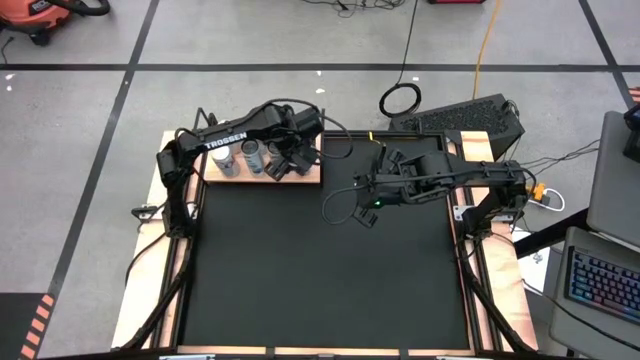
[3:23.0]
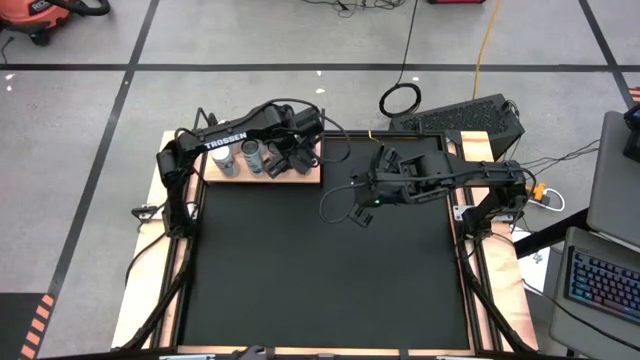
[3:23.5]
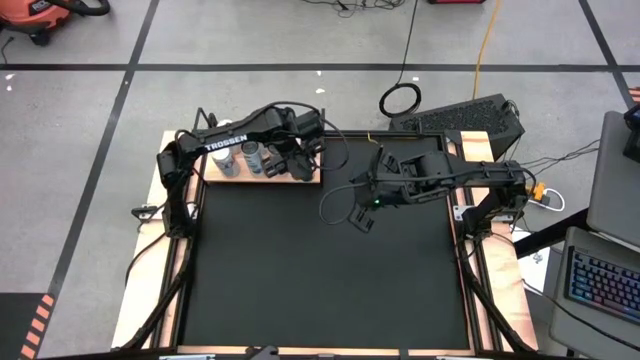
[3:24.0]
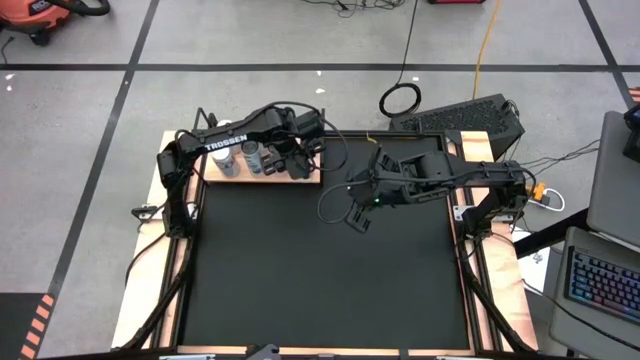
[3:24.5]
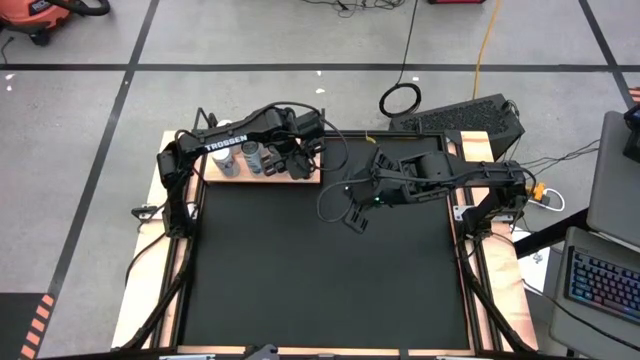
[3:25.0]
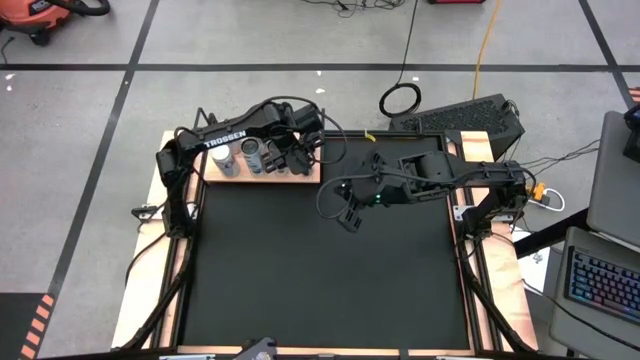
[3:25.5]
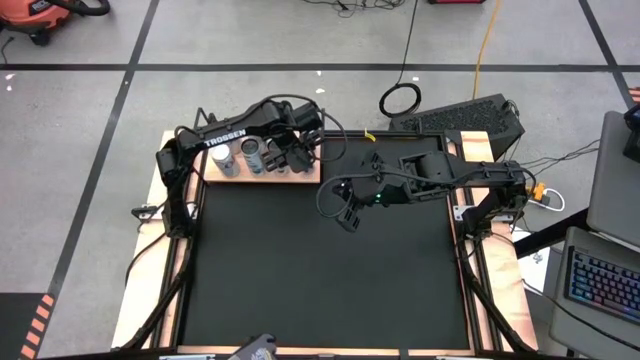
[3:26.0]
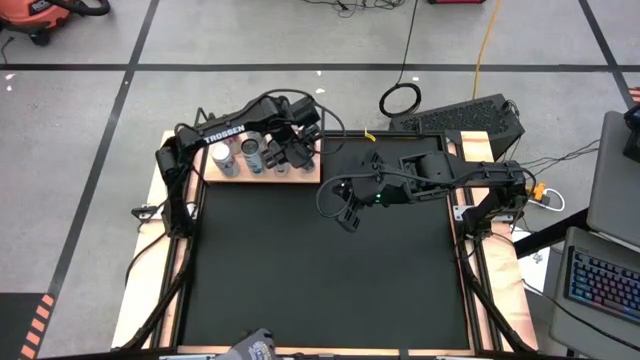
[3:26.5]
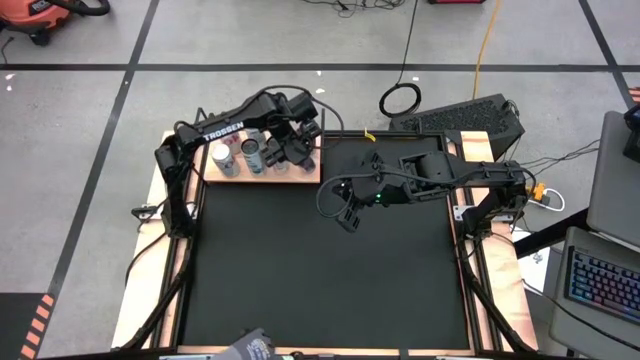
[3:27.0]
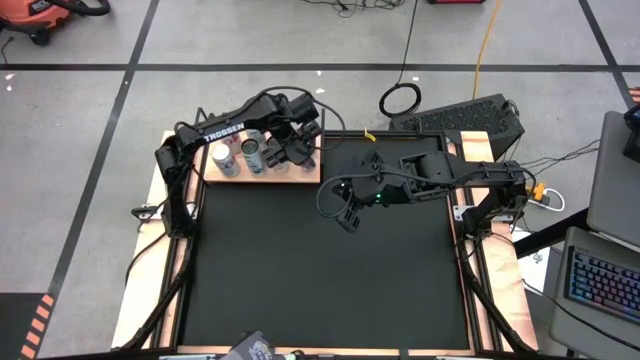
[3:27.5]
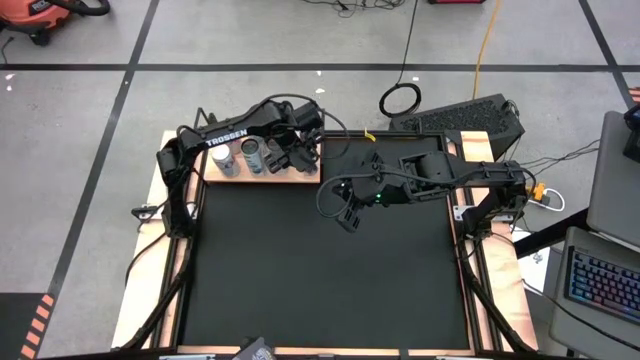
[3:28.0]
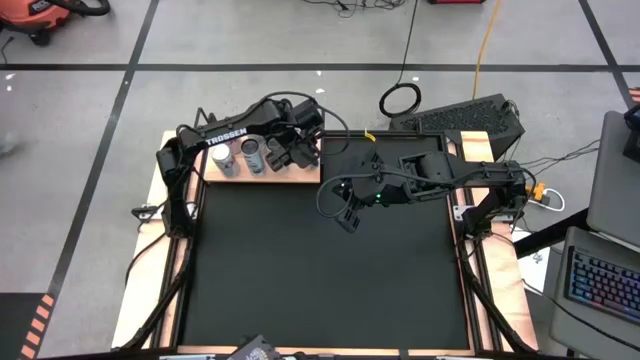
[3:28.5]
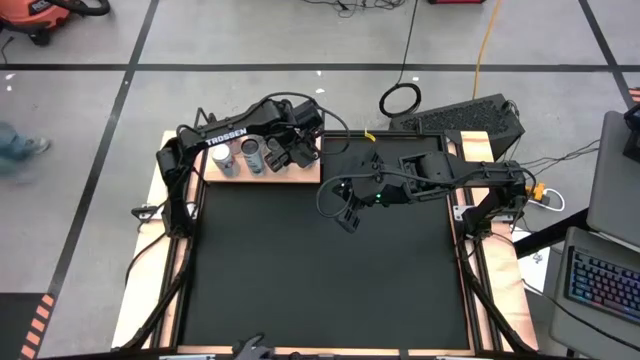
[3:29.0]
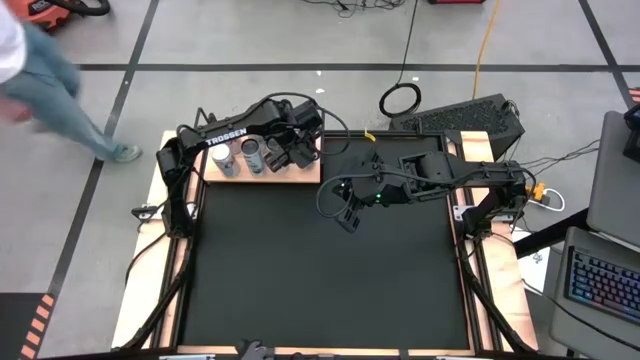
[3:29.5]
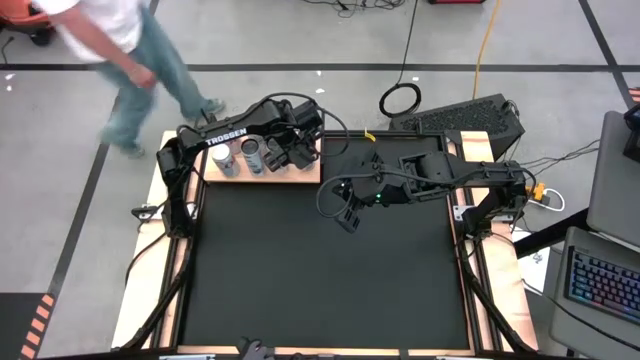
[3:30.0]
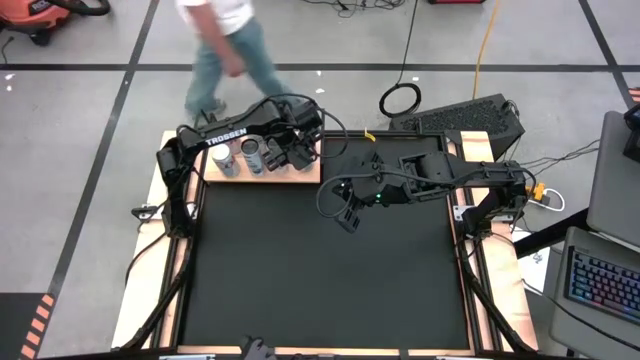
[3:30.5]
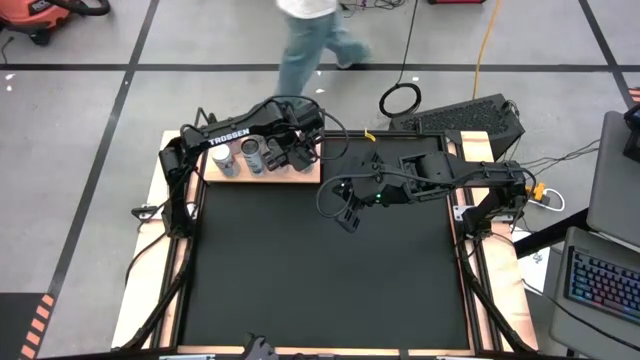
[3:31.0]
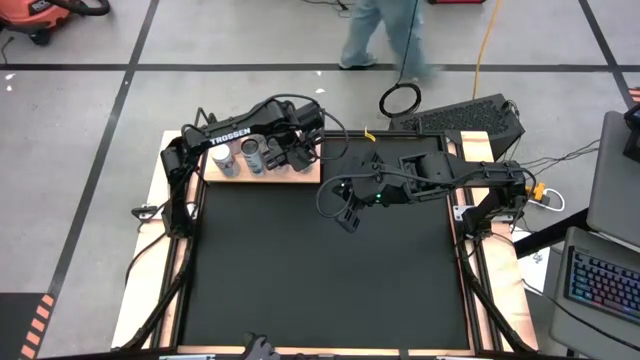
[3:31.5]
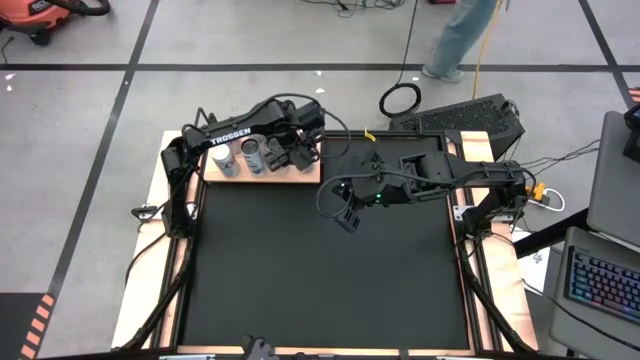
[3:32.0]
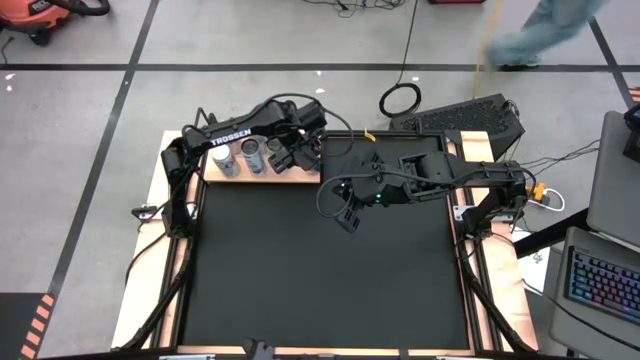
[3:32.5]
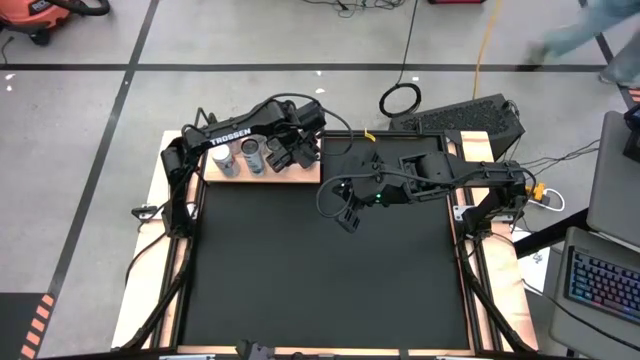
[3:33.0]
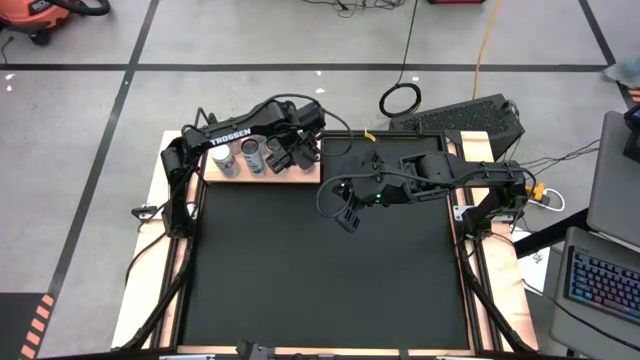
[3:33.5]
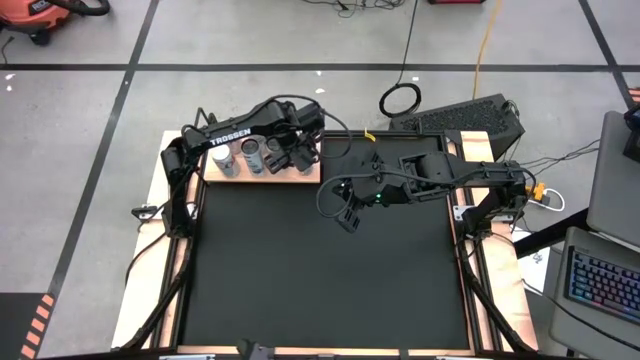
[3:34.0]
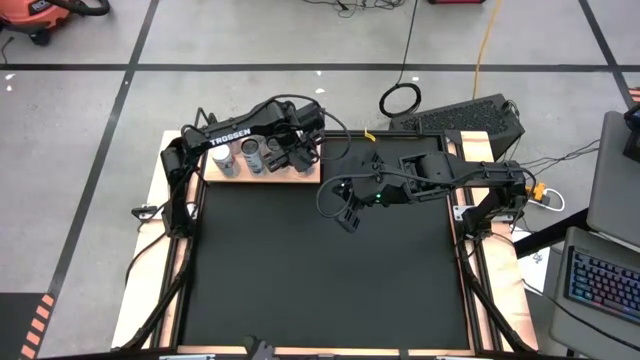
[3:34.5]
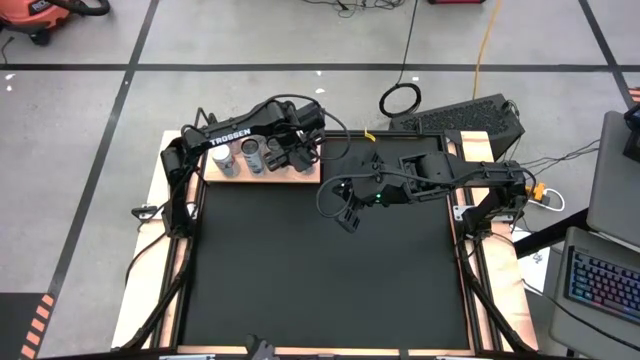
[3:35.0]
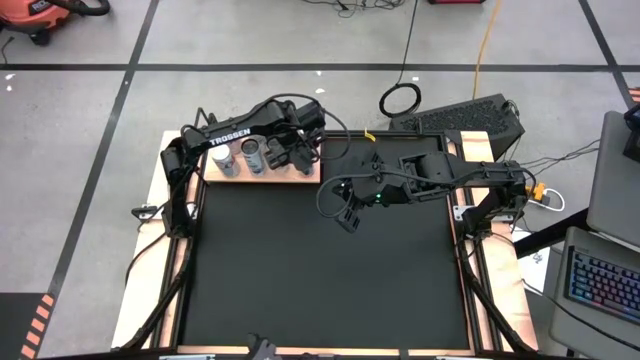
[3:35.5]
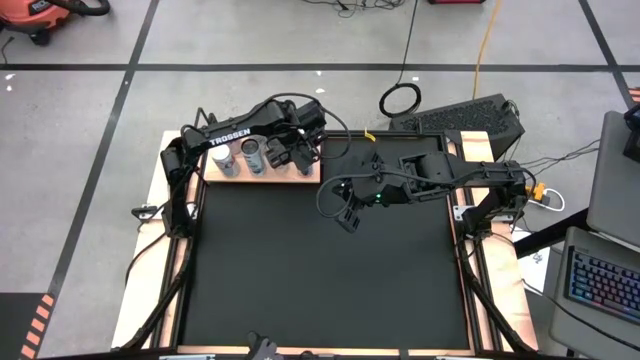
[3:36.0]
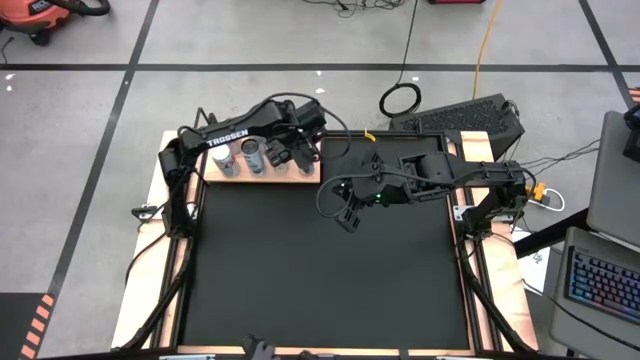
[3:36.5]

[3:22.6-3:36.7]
Task: Place canned beverage on shelf
Put the blue soda can on the shelf aligned with the blue soda can

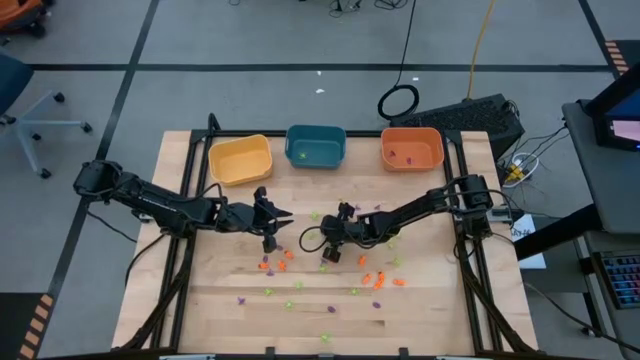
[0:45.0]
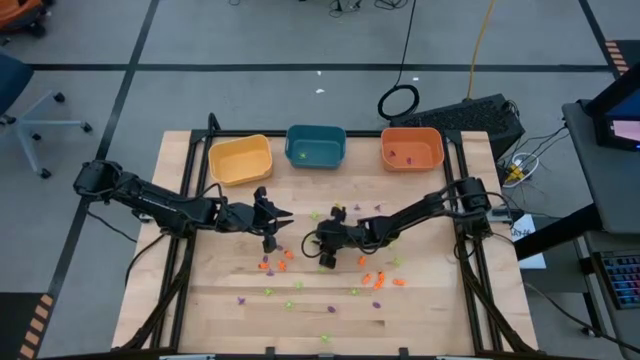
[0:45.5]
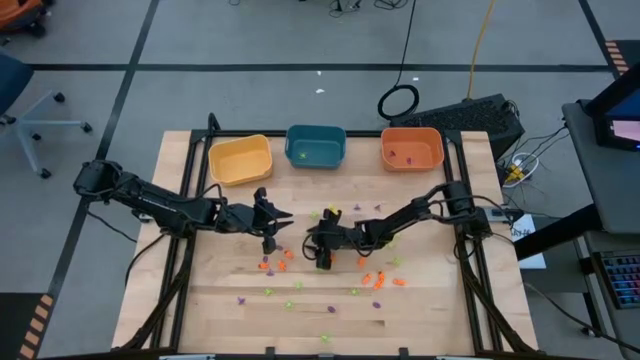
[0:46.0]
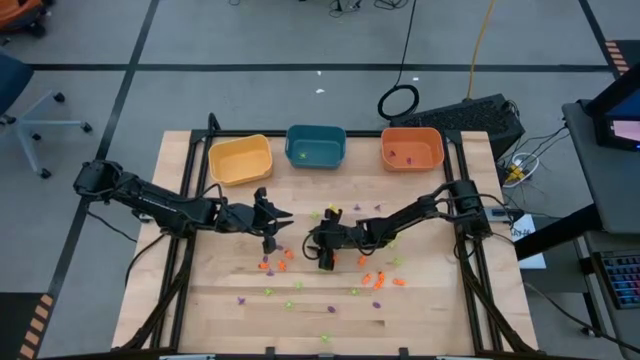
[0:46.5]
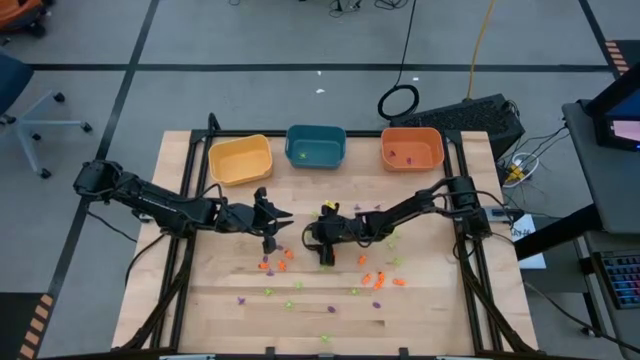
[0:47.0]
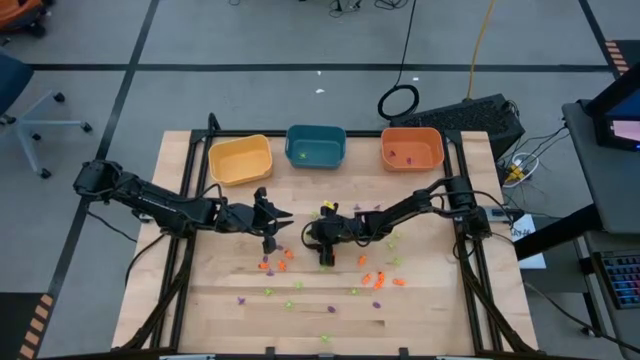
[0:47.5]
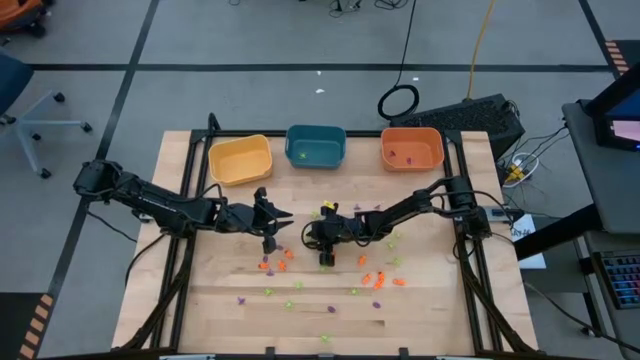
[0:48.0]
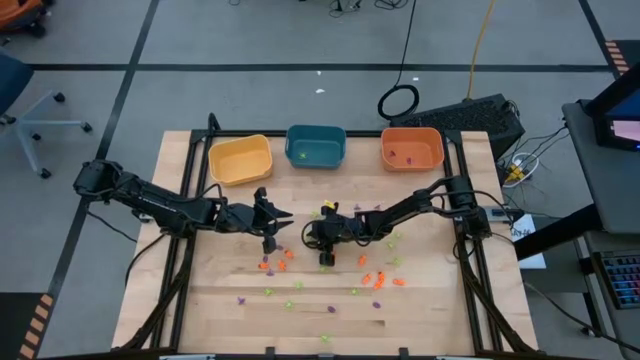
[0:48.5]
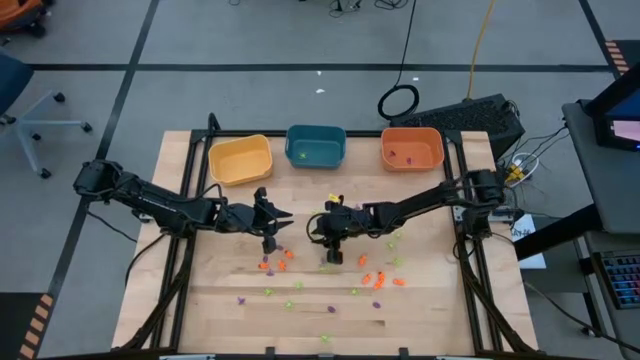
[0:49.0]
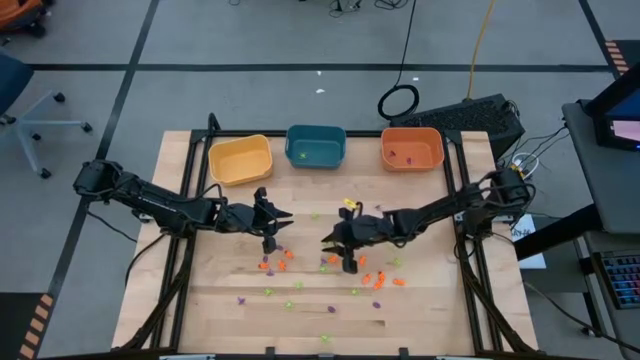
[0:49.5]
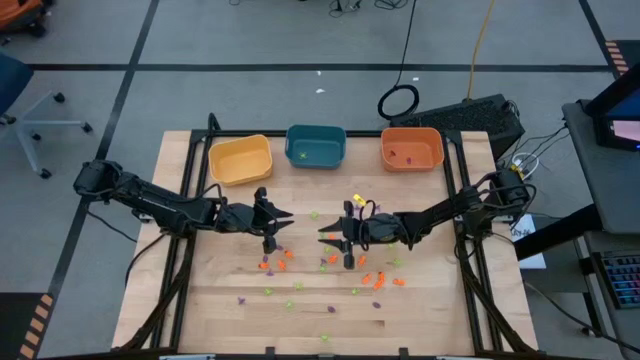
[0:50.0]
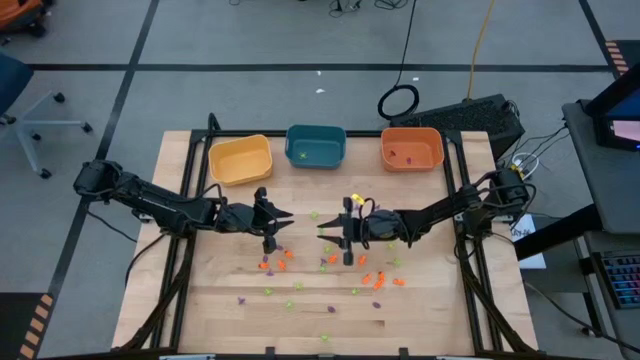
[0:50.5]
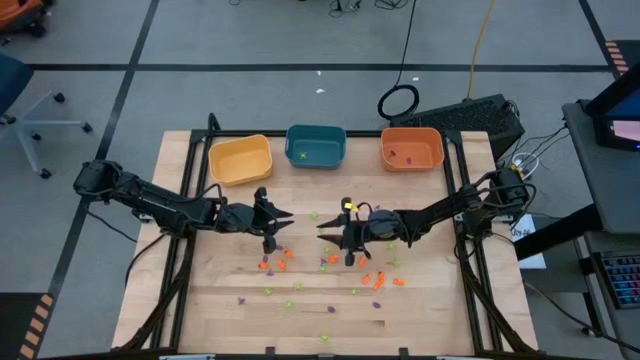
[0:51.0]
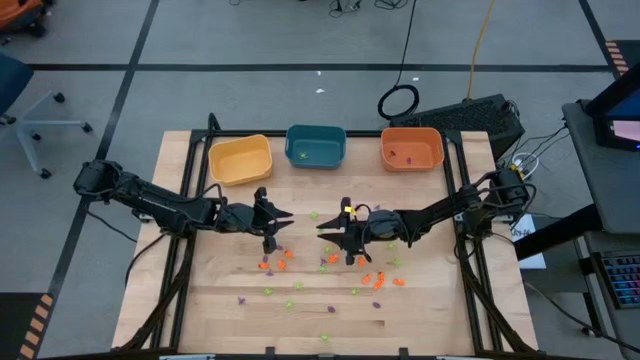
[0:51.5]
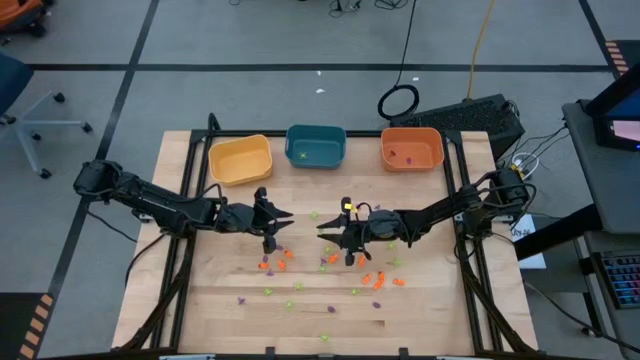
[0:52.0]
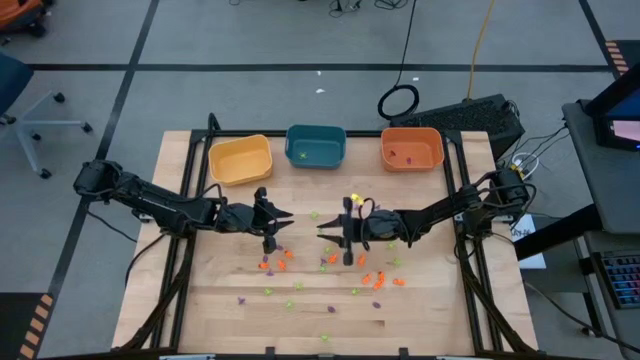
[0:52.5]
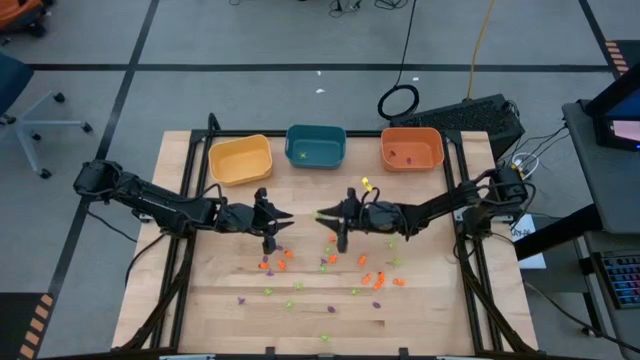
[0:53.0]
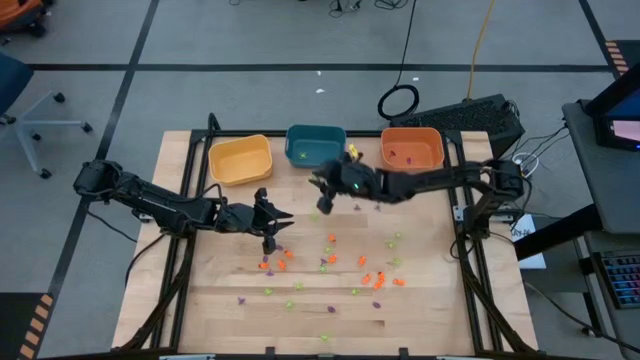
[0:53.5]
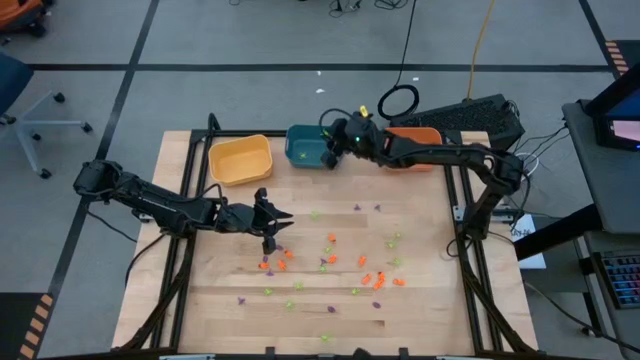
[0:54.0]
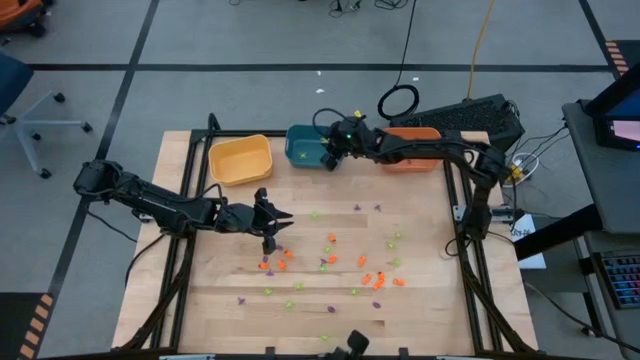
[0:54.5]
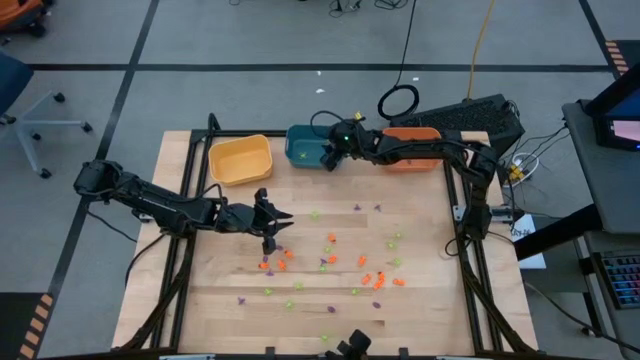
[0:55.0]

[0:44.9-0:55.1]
Task: Sort Halloween decoration
Put the green spider toy into the blue bin
